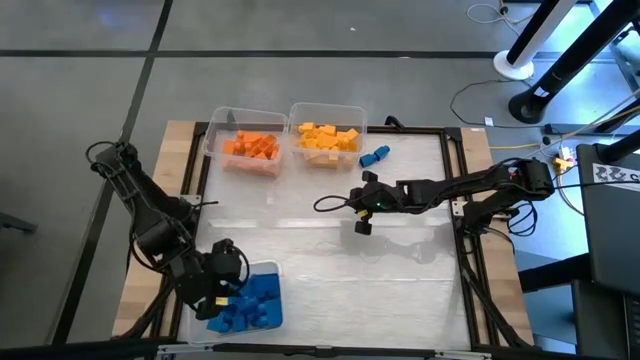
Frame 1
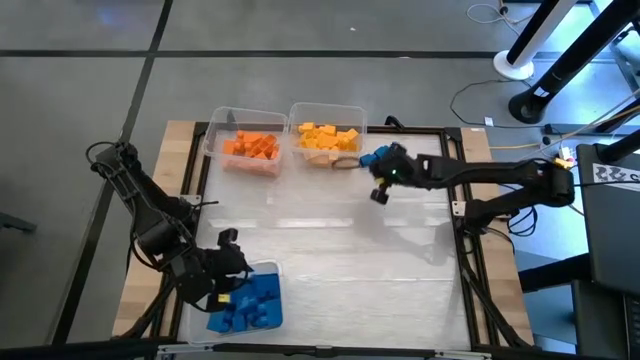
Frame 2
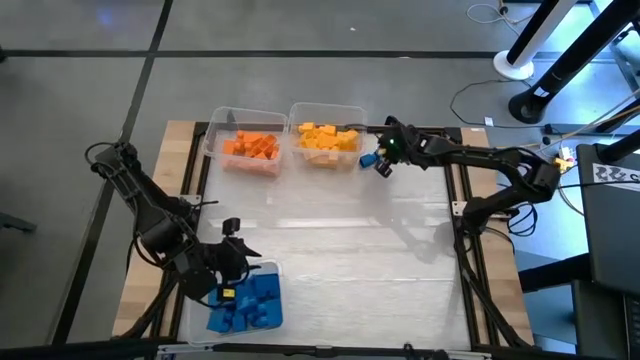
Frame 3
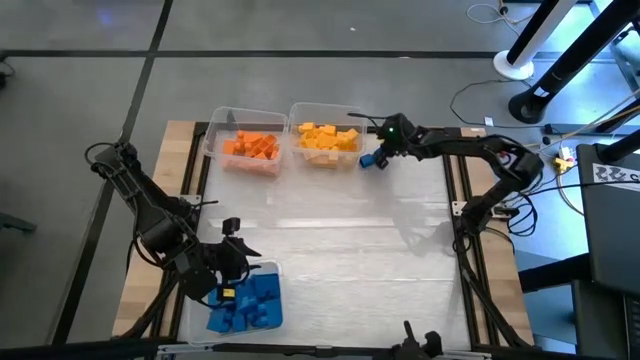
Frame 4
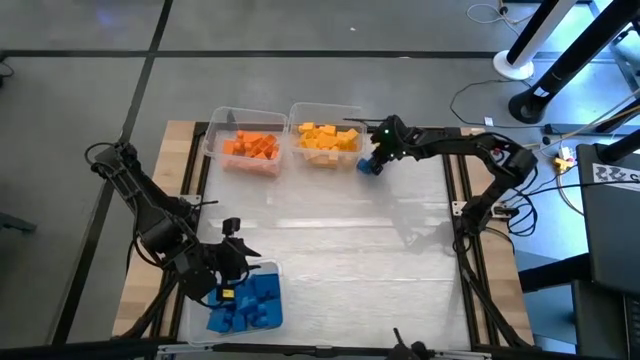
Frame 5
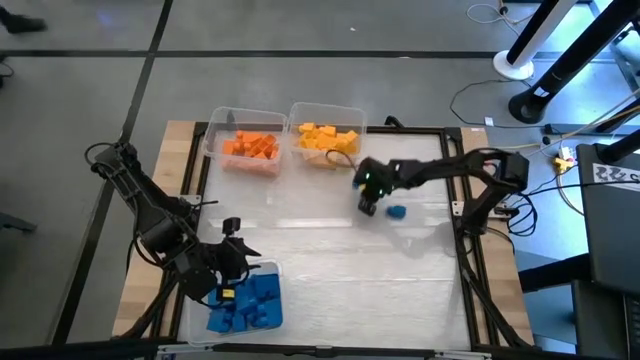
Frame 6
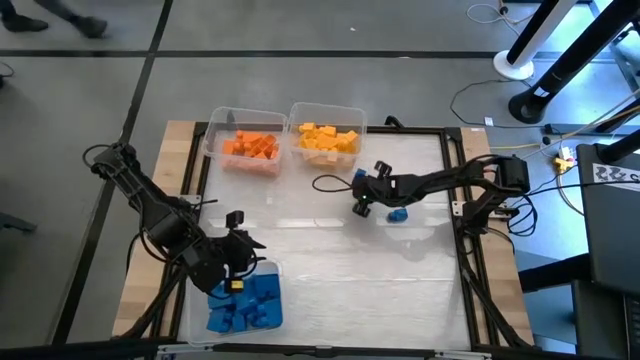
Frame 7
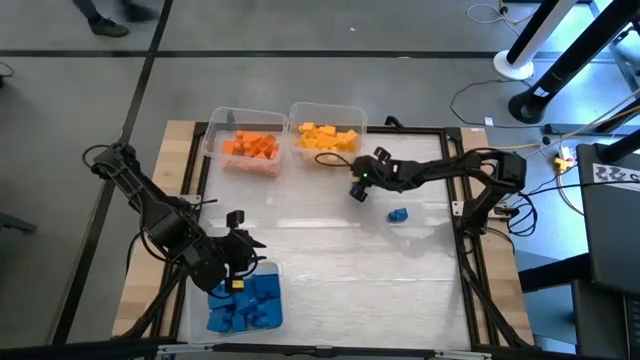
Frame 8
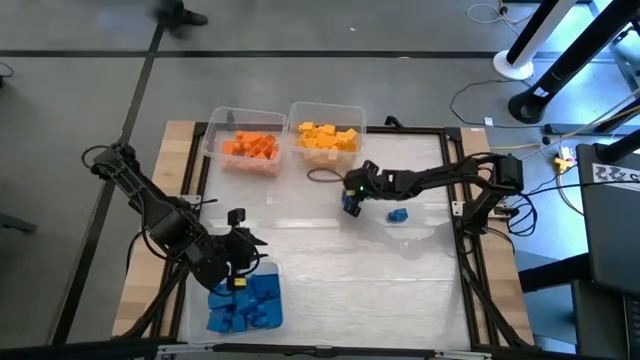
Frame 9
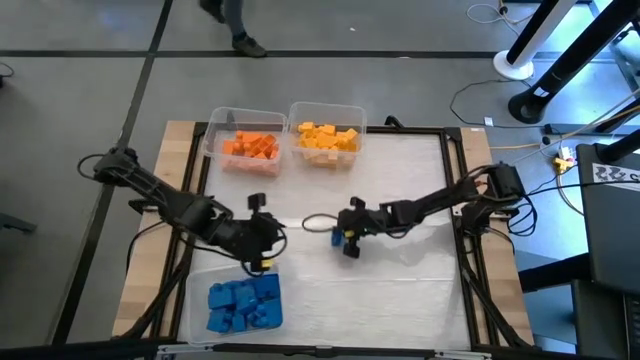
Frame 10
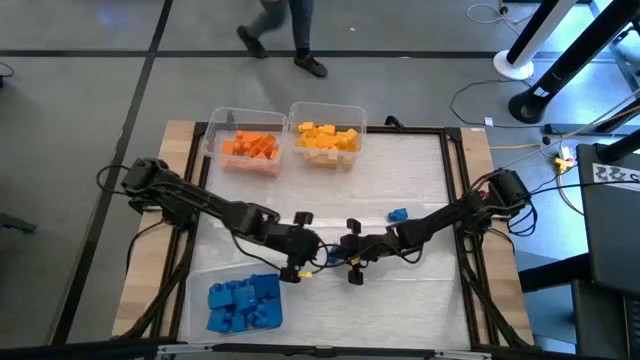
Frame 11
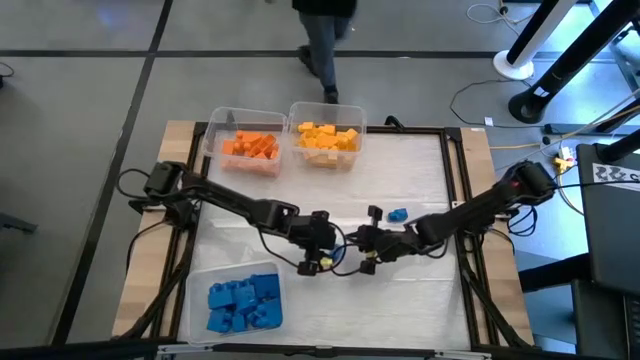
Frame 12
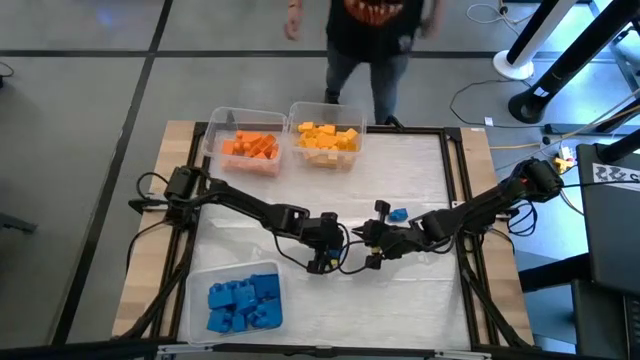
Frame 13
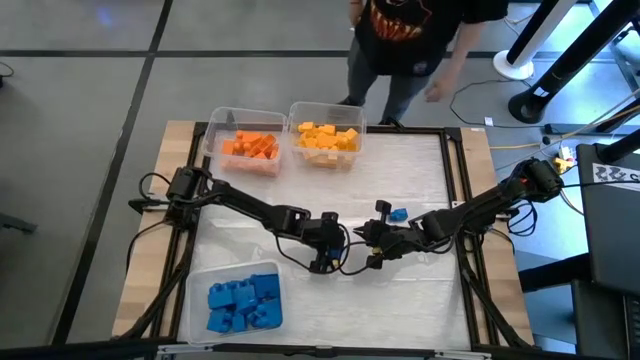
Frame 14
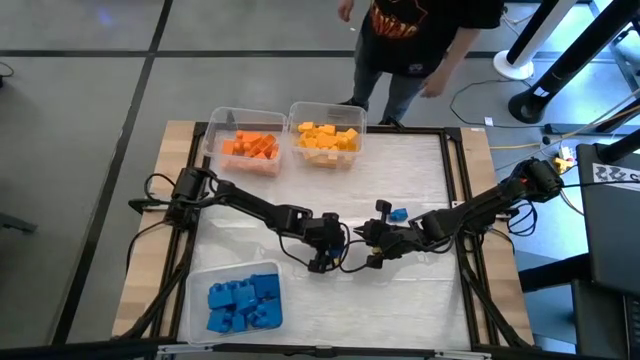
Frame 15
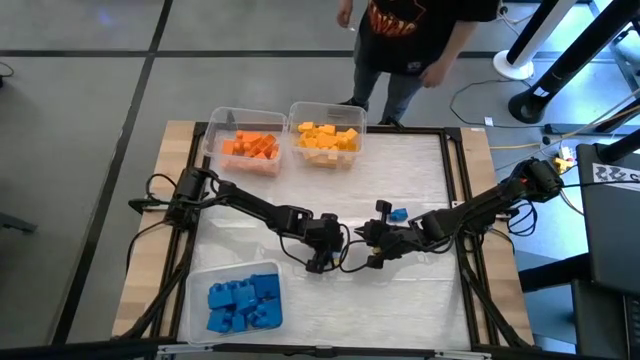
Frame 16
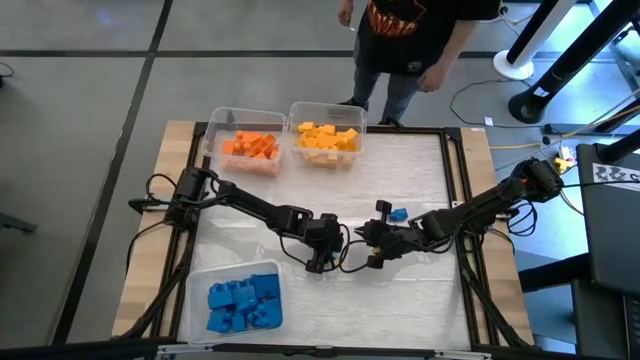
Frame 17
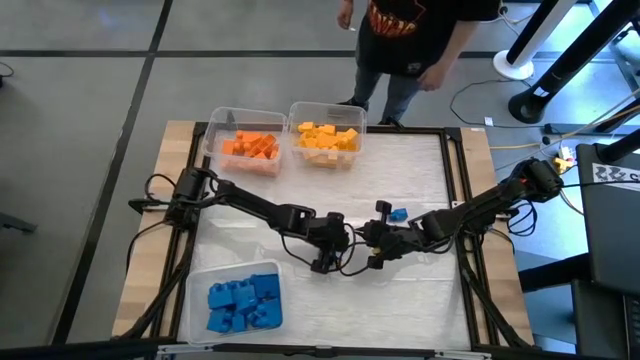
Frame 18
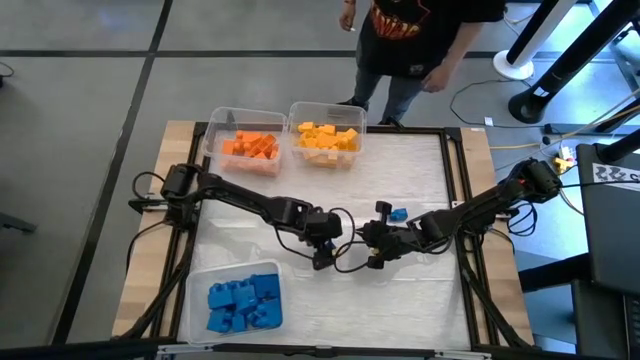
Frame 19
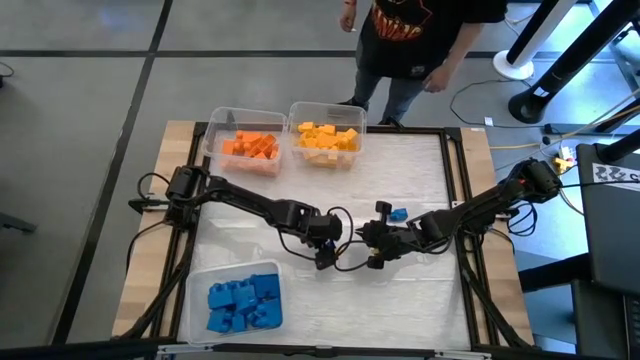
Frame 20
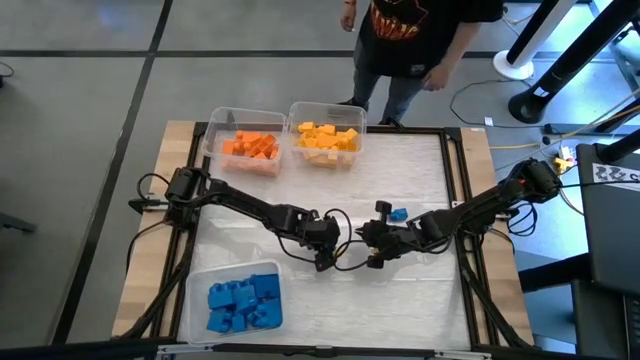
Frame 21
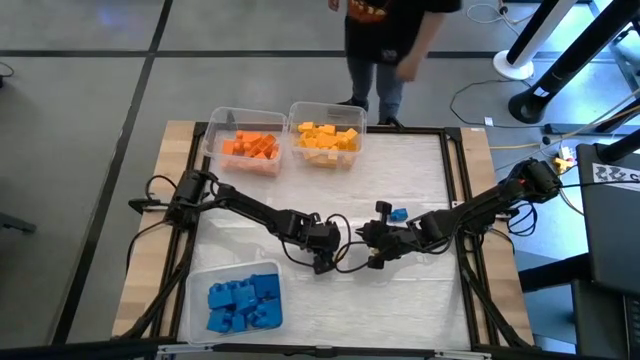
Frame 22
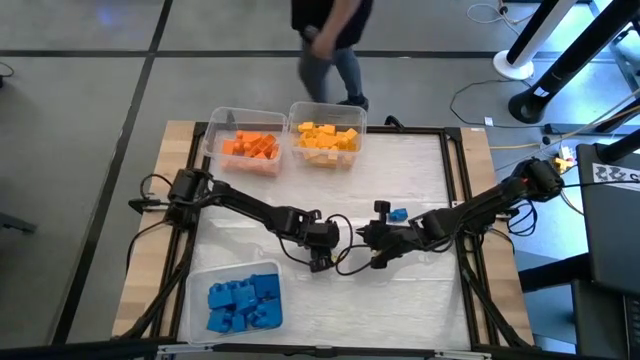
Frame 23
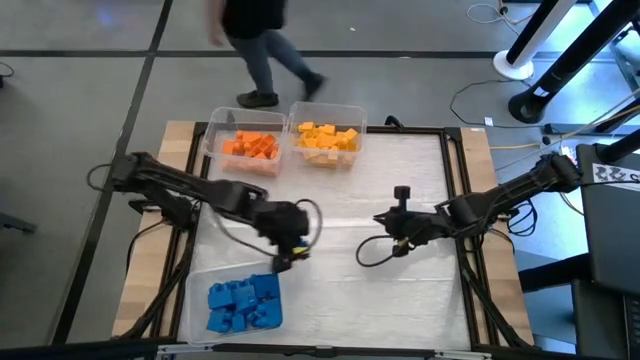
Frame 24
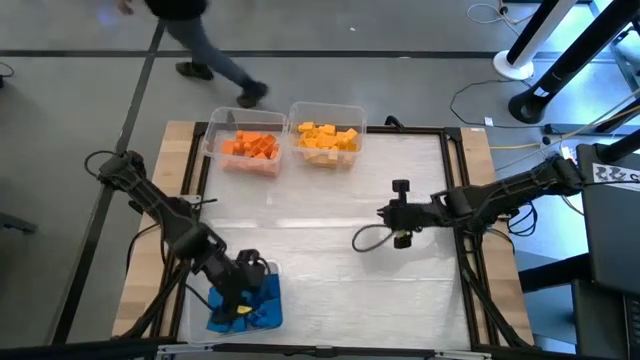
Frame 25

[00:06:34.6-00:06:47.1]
Task: Sort blocks
Put the blue game piece into the bottom transparent bin

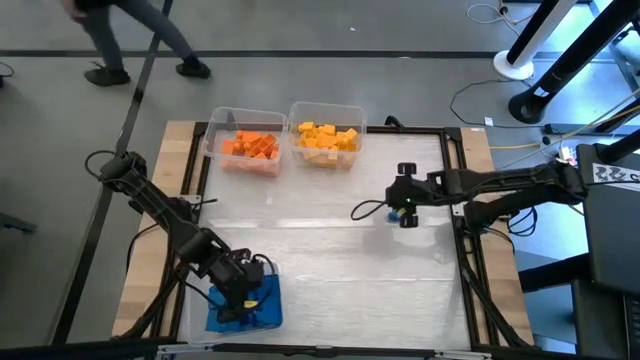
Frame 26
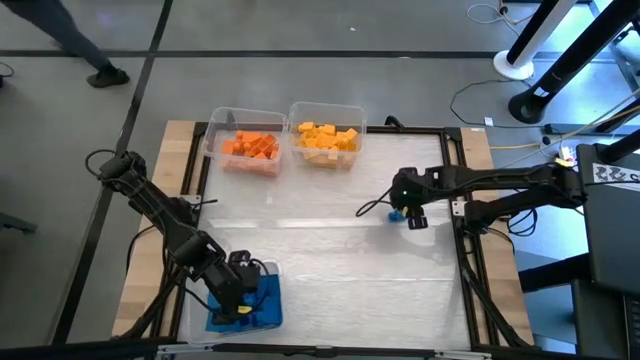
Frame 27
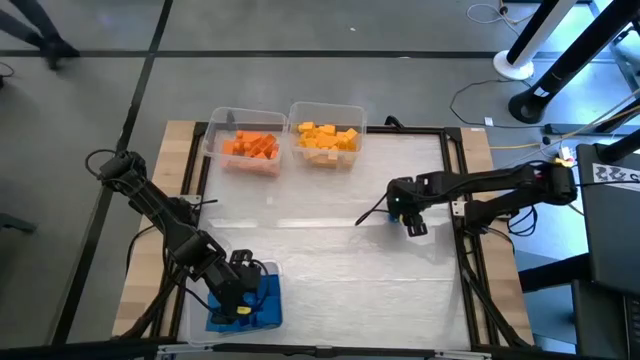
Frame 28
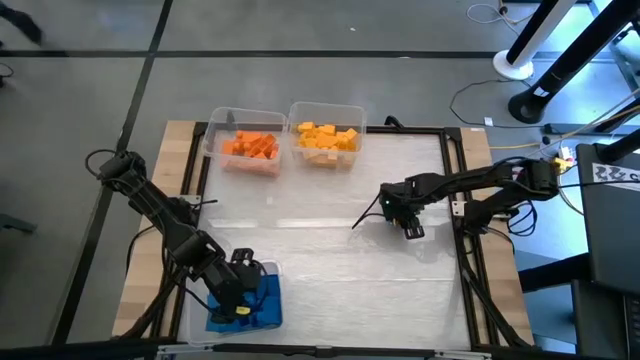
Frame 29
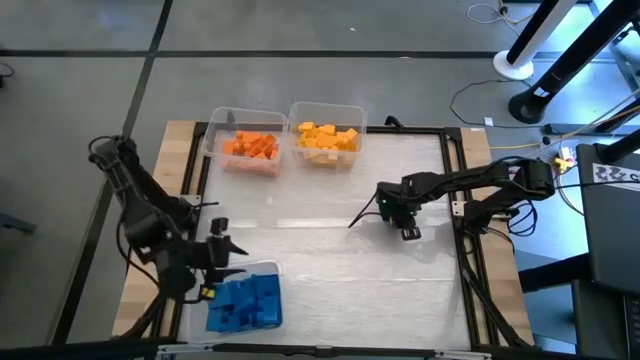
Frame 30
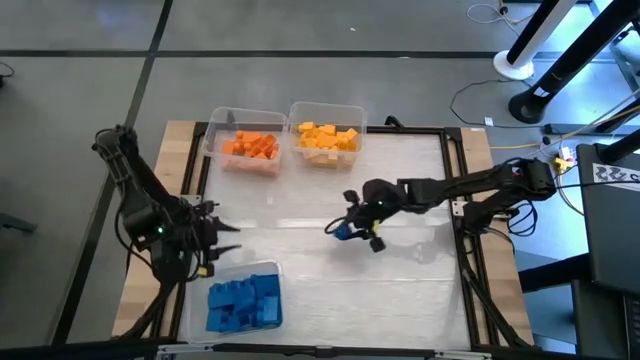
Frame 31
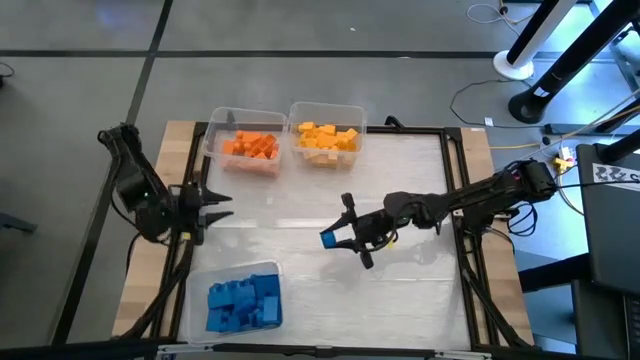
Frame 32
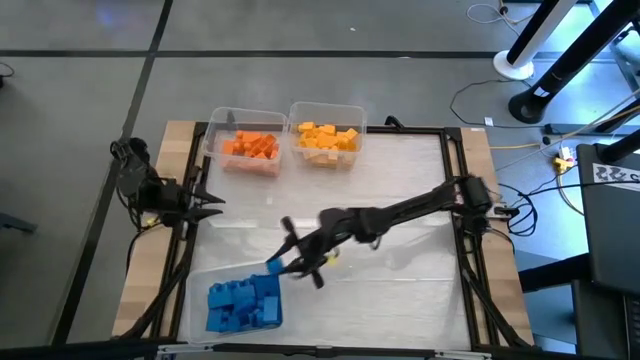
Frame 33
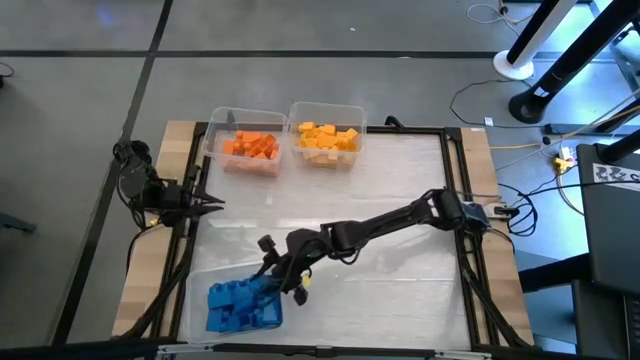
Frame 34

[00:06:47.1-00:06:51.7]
Put the blue game piece into the bottom transparent bin

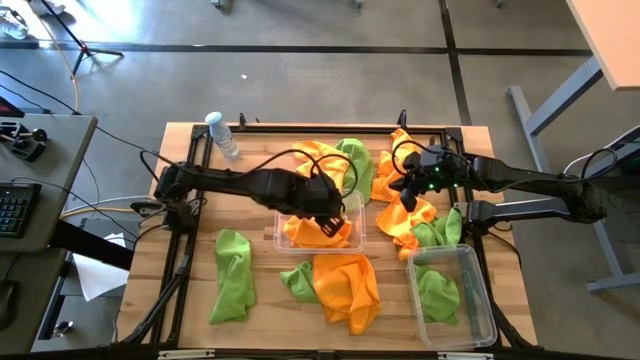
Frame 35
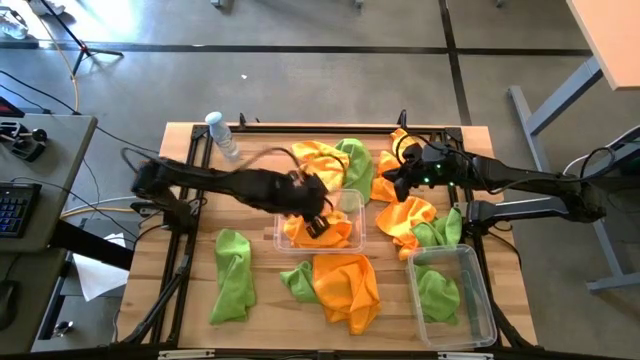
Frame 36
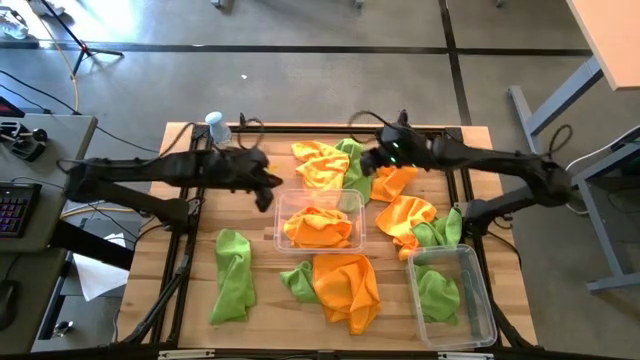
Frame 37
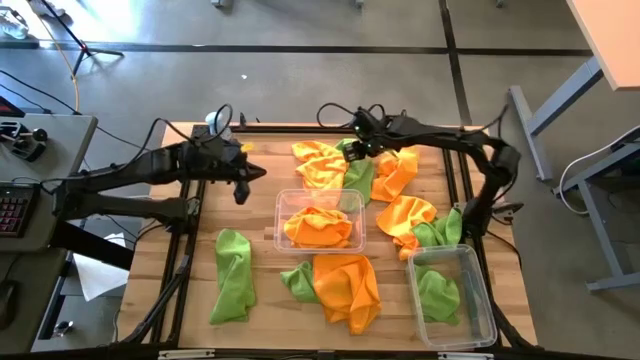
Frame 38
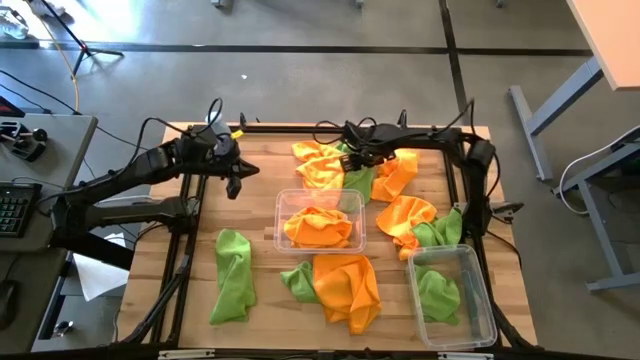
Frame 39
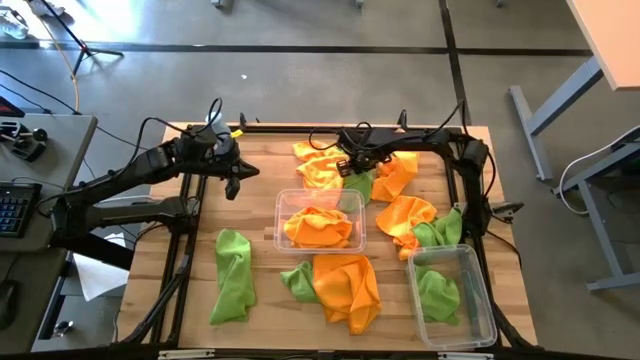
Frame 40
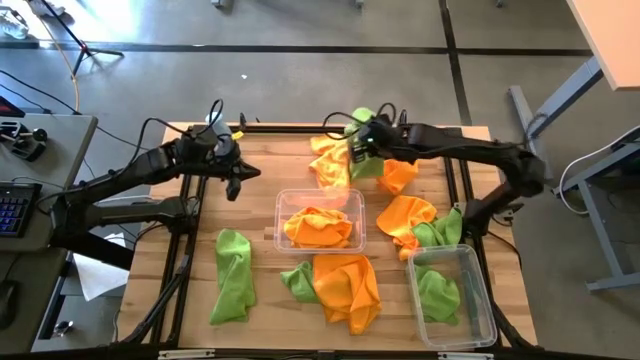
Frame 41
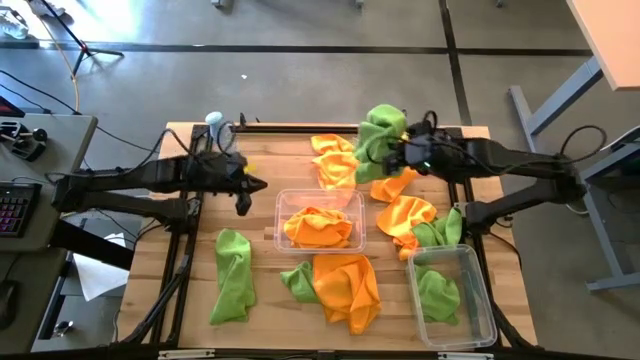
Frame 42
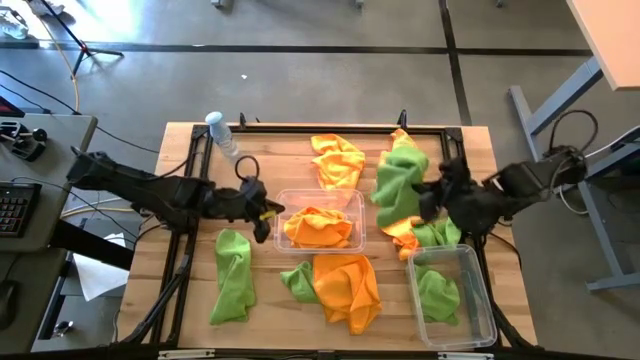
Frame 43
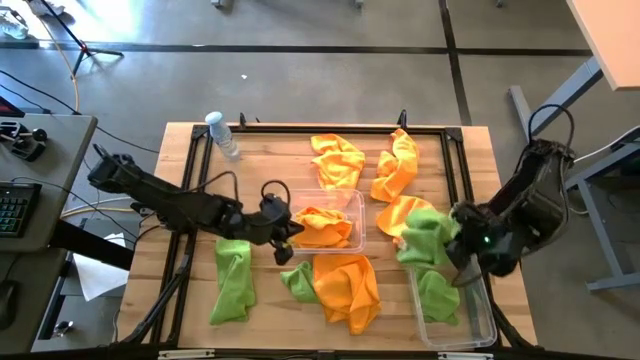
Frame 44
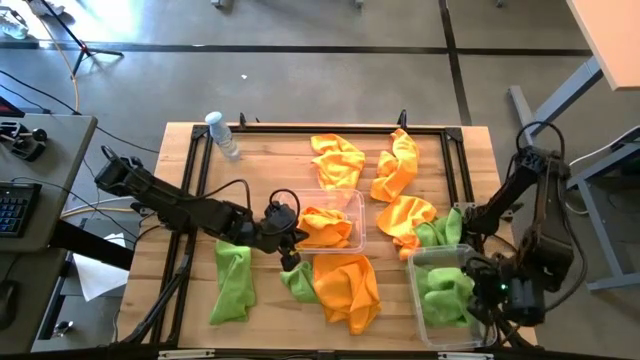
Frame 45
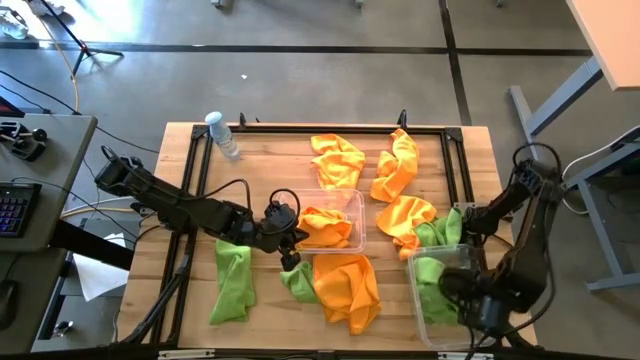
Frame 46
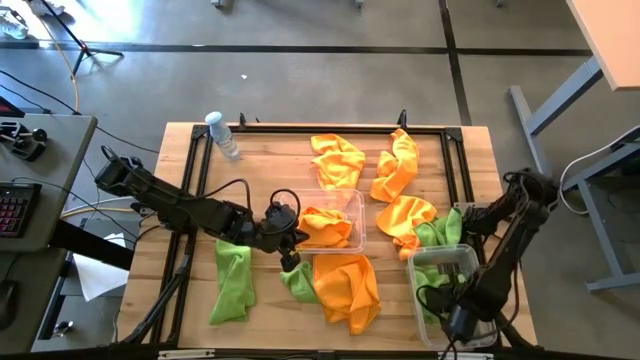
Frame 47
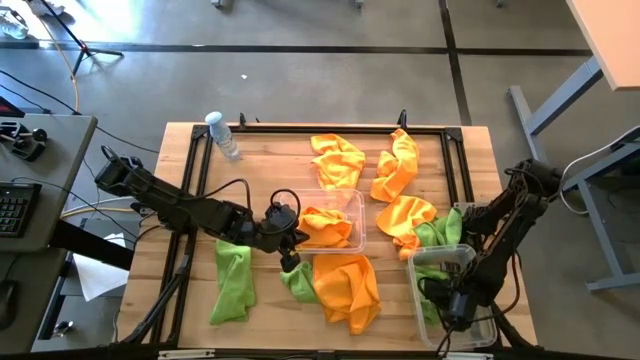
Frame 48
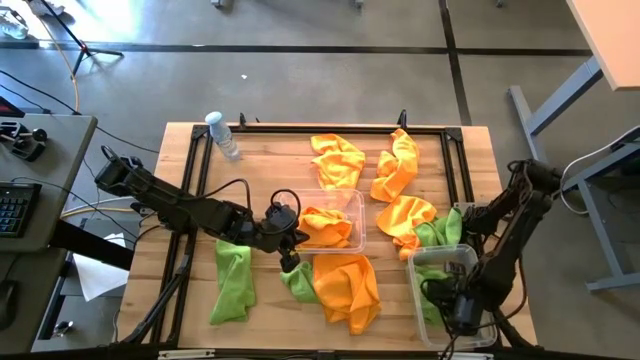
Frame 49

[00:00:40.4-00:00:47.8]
Task: Sort microfiber towel by color & place in baskets
Put the green towel into the bottom transparent bin
